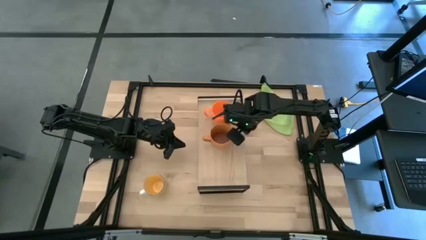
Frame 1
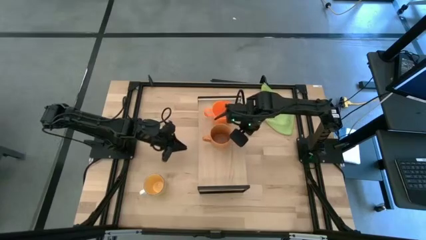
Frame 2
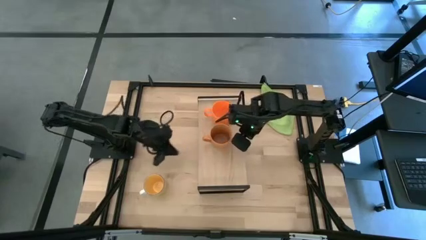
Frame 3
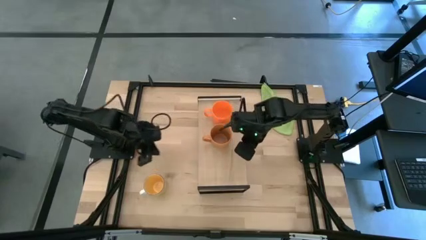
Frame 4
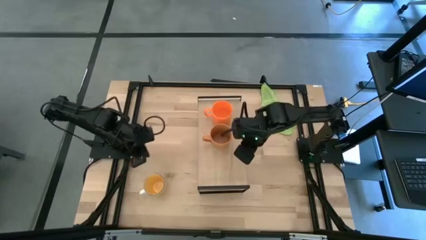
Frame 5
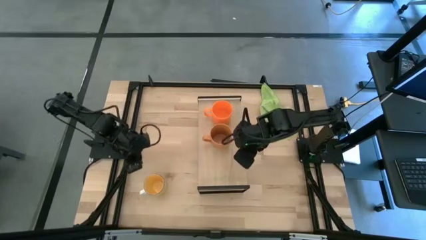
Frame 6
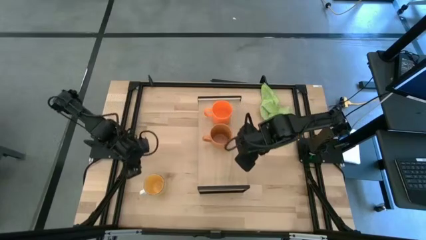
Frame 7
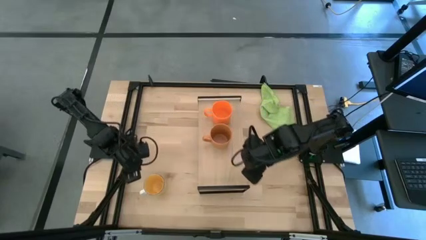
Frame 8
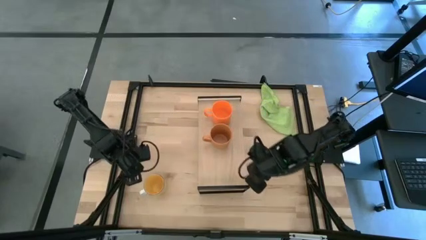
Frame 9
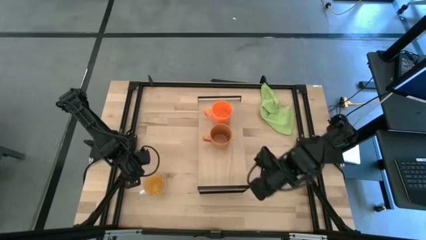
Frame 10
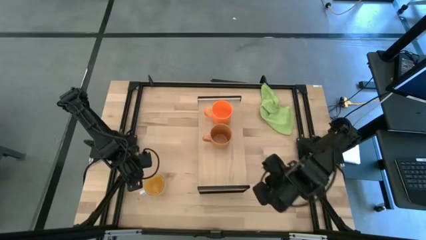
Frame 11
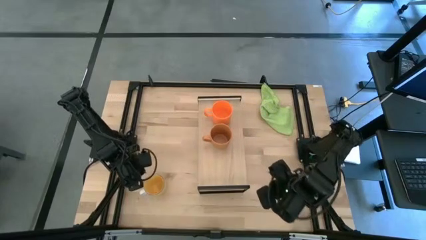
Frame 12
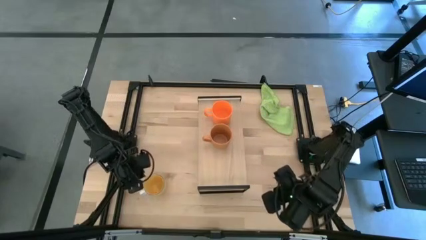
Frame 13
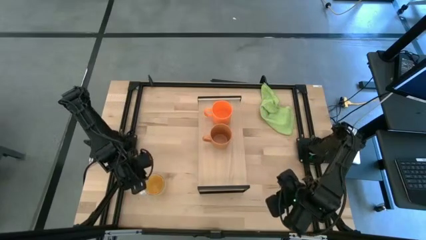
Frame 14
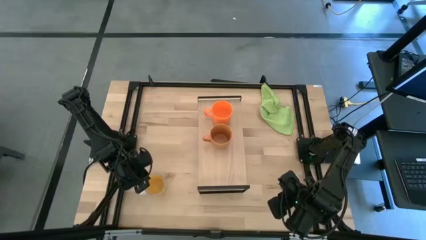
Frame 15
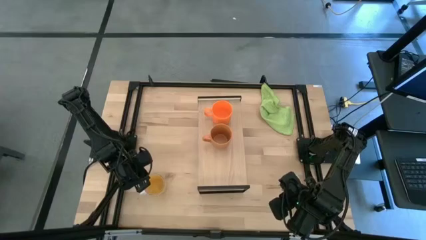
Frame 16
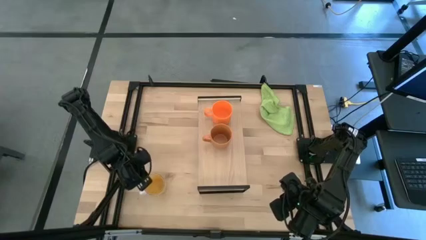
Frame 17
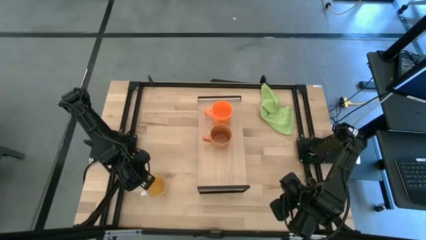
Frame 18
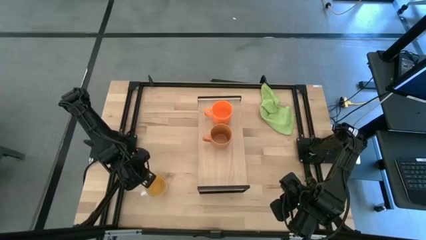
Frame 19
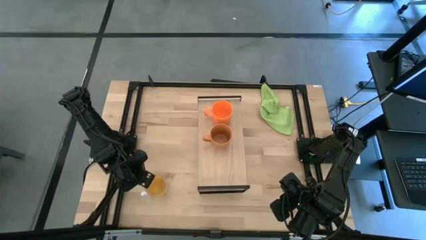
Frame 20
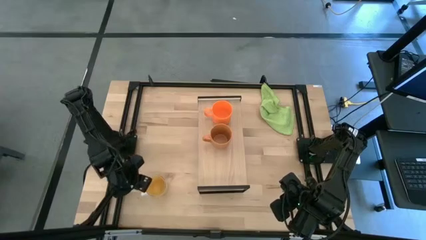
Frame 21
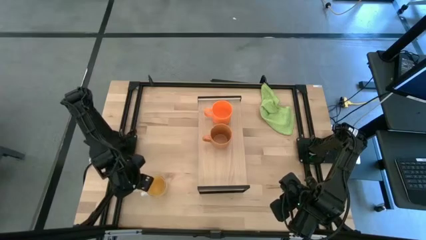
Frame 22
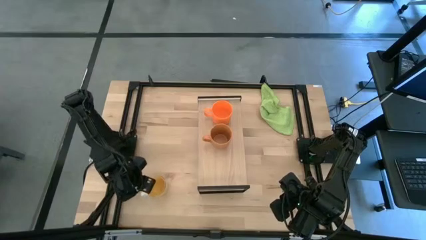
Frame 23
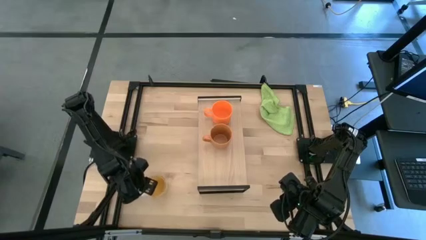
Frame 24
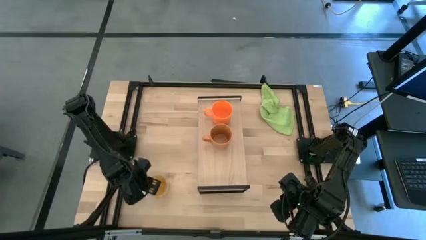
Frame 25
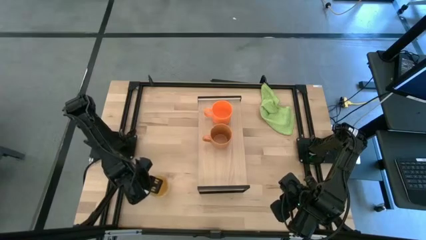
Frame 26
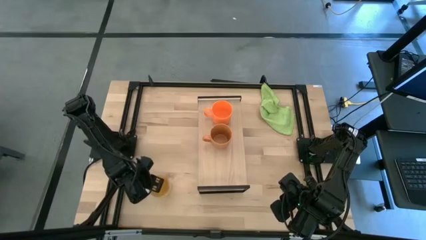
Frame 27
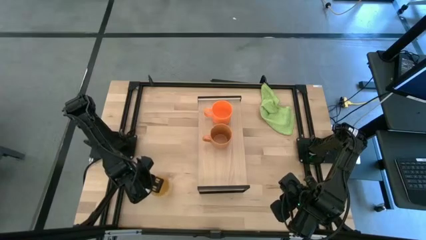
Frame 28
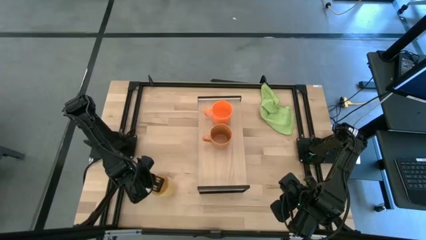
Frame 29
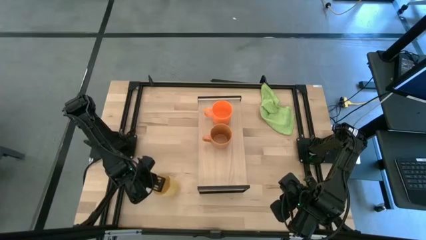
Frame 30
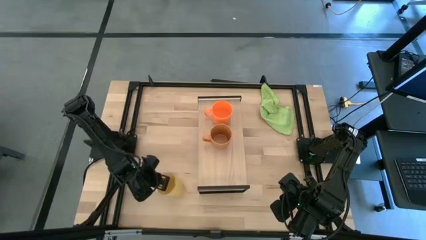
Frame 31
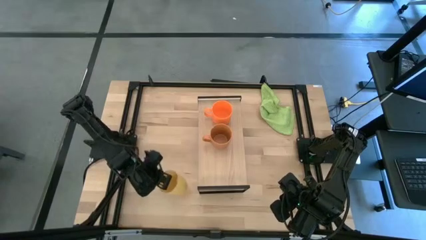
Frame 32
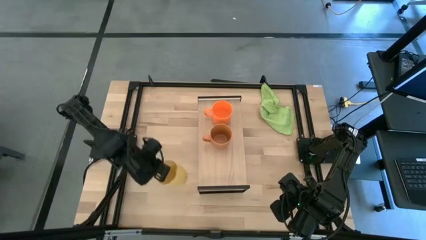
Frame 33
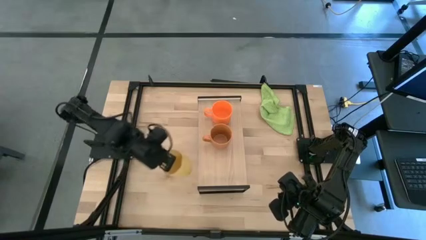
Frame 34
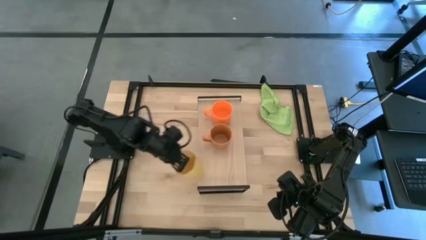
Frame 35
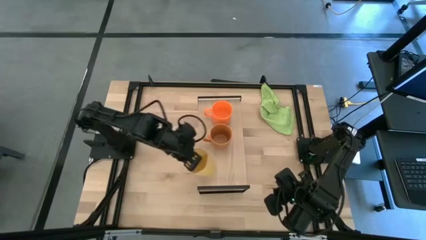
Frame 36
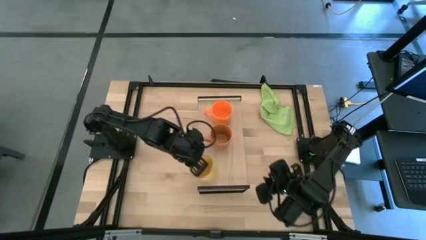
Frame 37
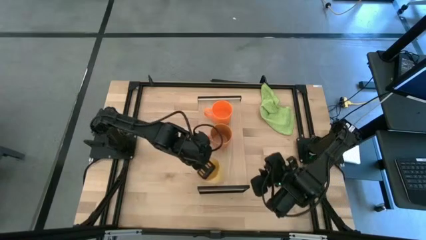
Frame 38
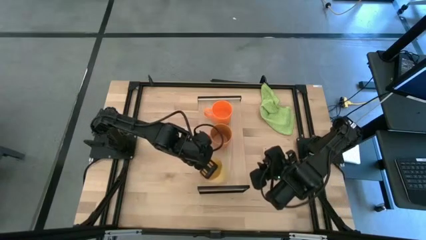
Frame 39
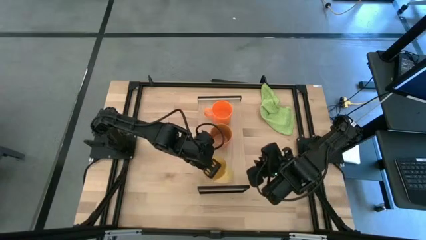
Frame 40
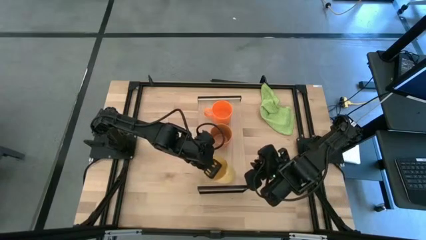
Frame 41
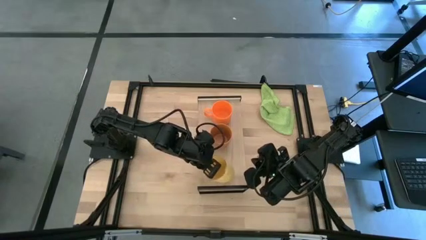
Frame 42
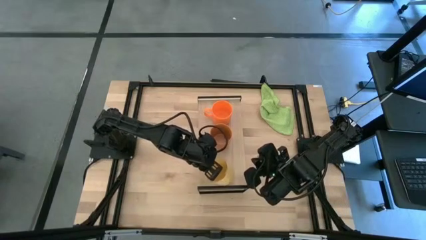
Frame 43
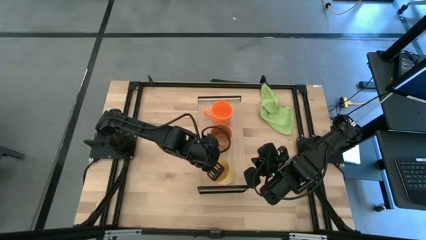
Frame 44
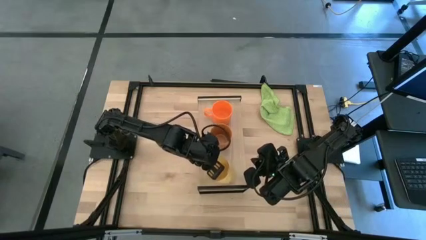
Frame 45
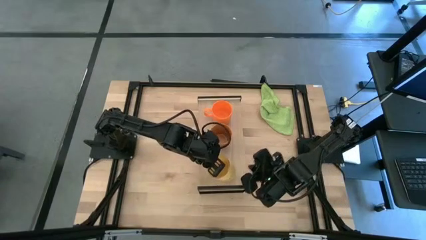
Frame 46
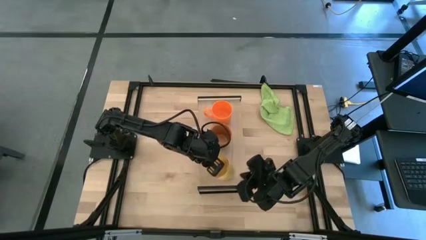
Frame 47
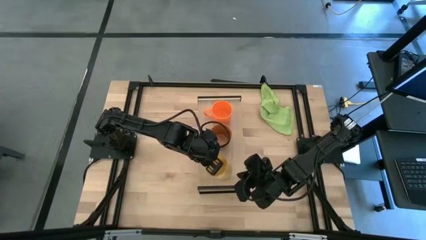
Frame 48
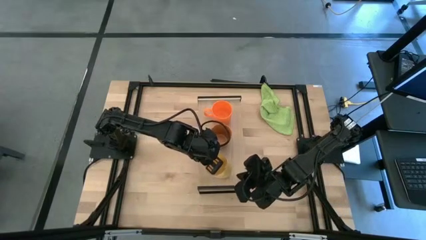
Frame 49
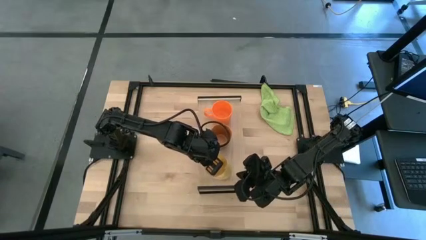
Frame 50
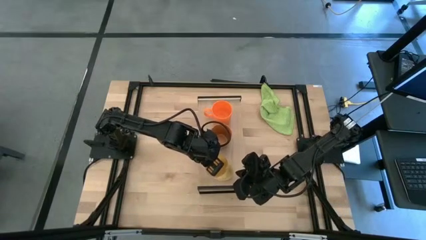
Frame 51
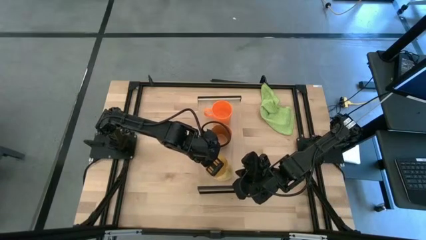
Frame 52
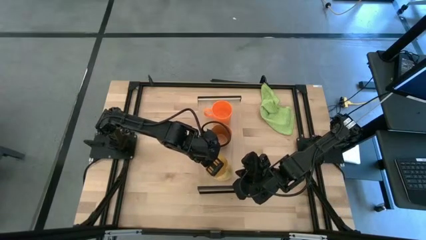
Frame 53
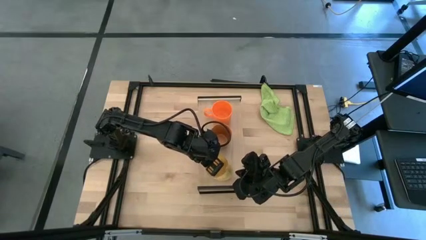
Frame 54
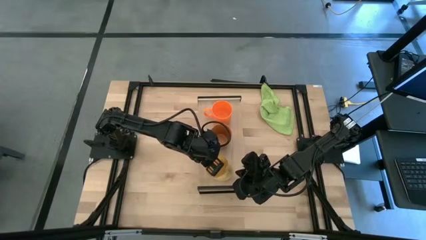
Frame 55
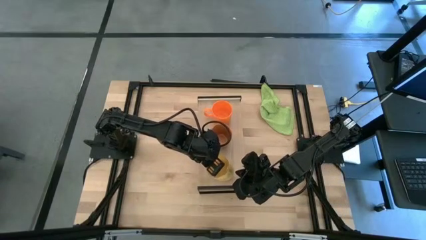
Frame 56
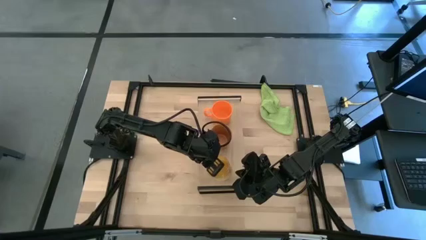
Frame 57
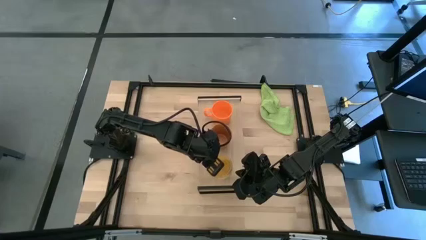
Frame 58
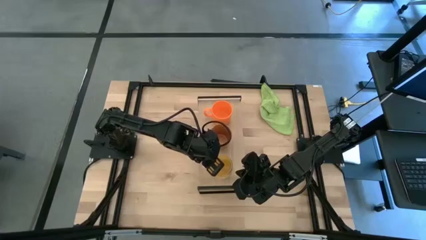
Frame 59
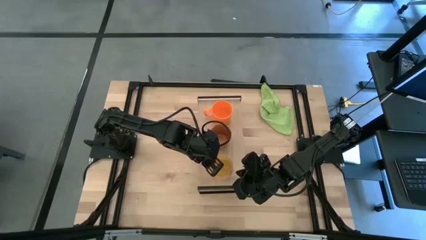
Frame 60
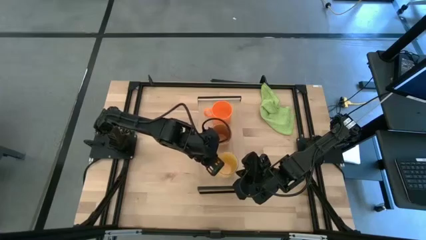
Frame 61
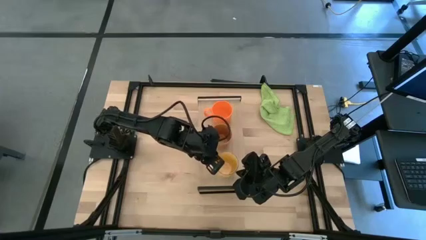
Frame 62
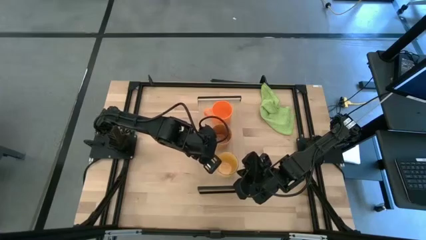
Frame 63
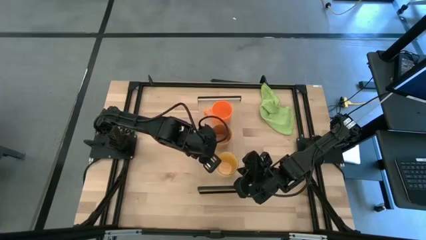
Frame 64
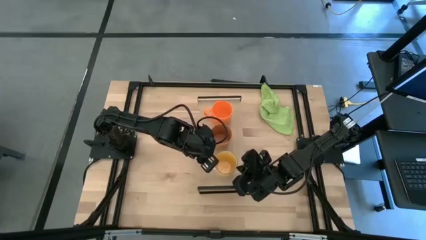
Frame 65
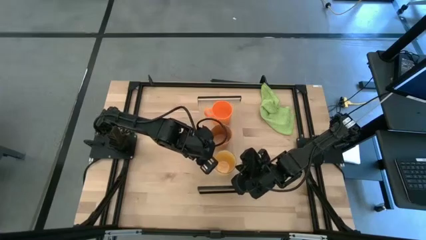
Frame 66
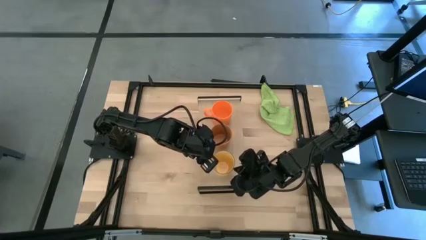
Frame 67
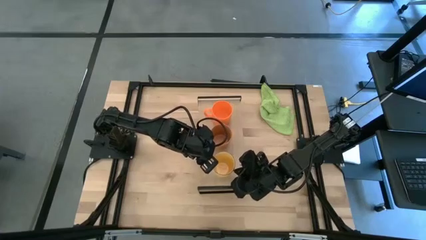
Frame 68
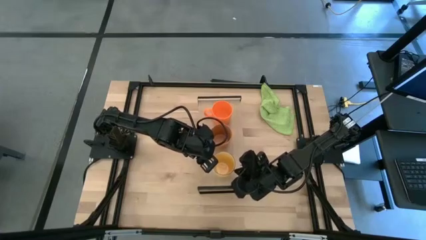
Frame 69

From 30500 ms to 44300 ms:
Task: Stack small to large cups/mugs on shelf
Put the yellow mug on the shelf

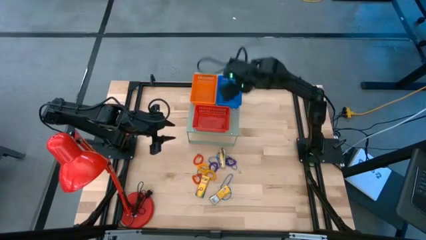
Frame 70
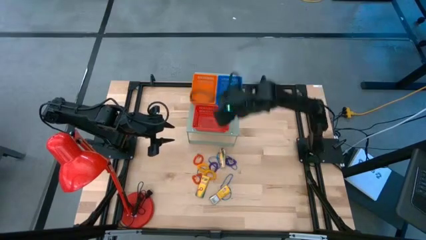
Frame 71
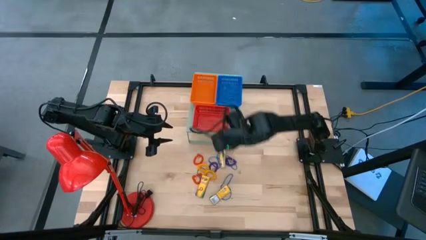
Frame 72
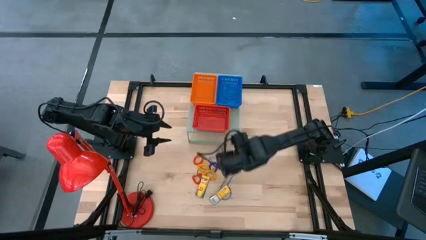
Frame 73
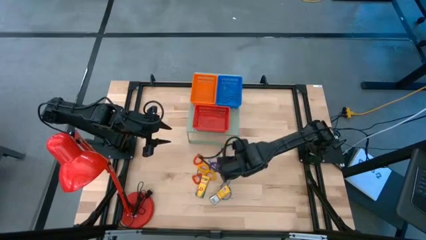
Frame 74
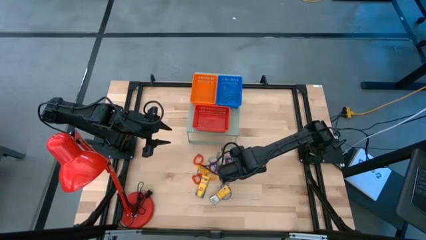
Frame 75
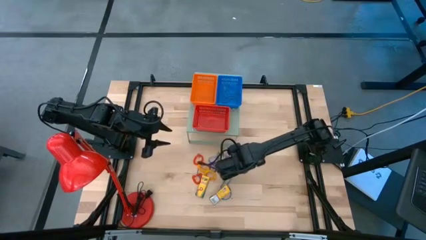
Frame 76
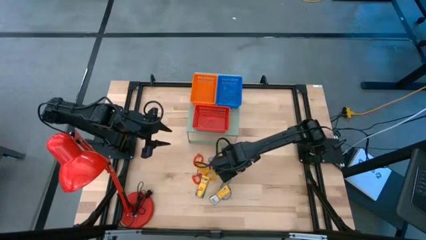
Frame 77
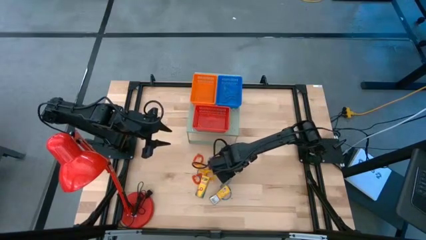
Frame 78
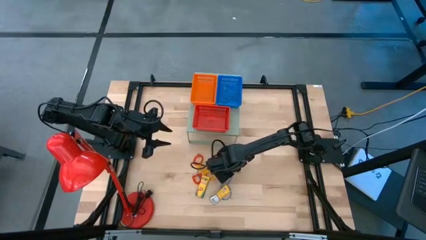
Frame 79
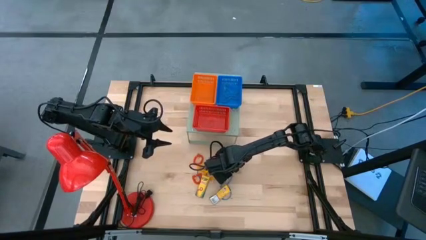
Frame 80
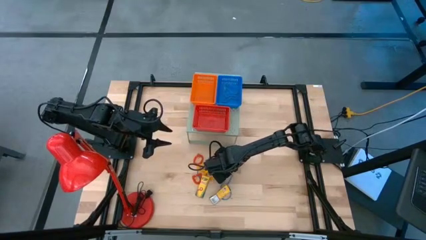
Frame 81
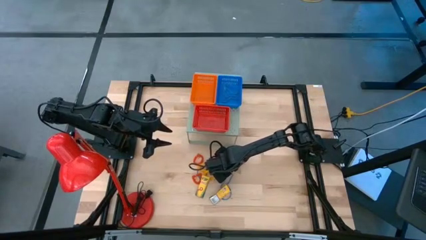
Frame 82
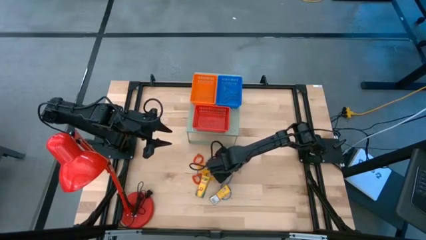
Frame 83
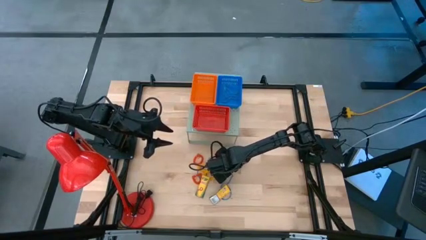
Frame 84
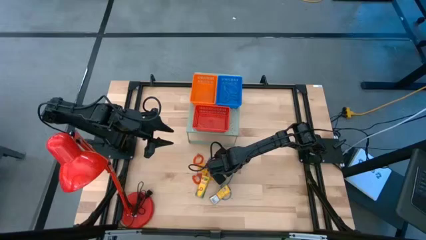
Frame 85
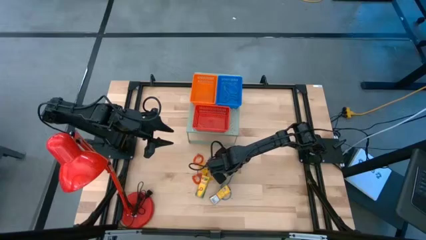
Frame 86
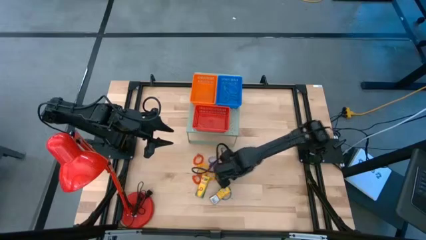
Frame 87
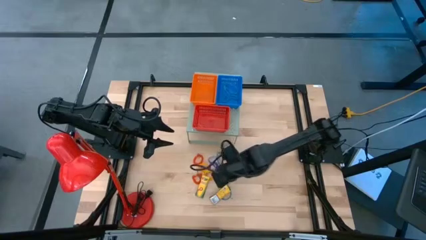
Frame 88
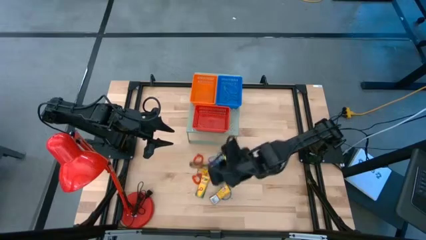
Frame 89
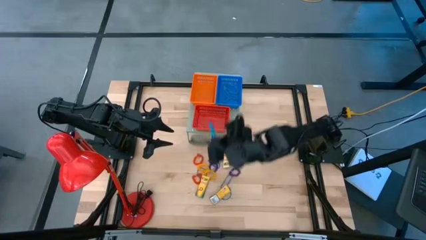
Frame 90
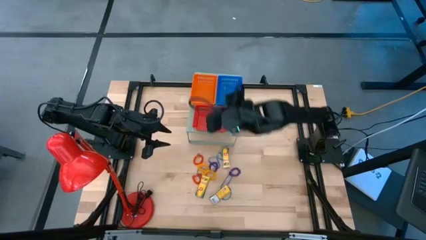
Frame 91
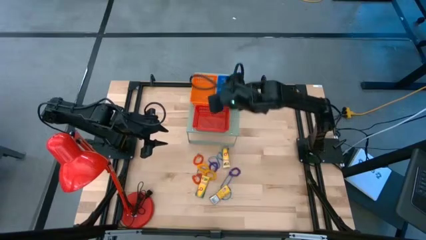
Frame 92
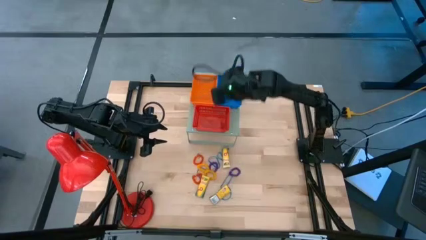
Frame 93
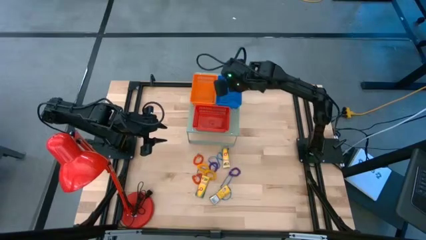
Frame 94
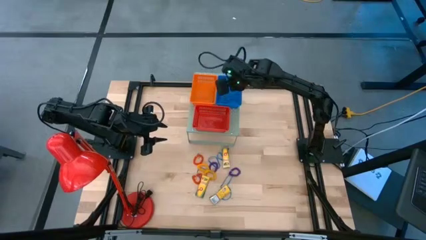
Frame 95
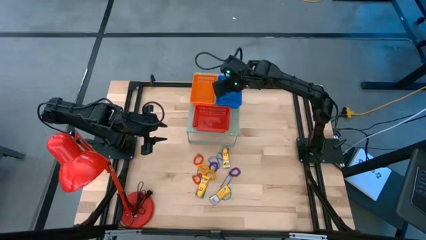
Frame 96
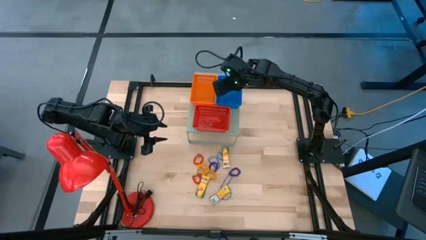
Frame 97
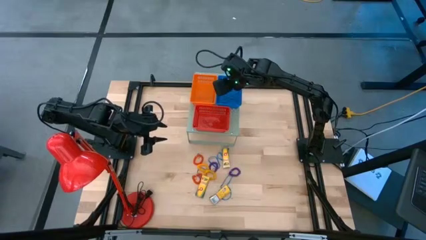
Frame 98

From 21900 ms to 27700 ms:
Task: Pick & Place Office Desk Supplies
Put the blue rubber band into the blue bin
